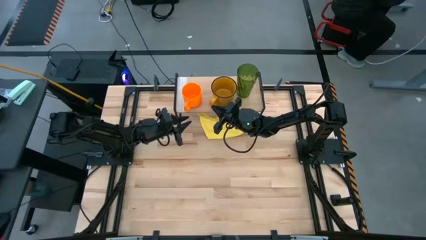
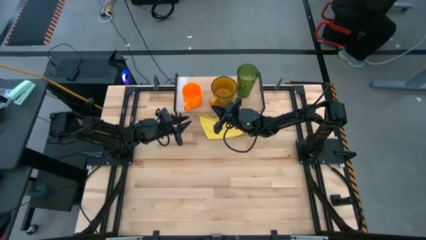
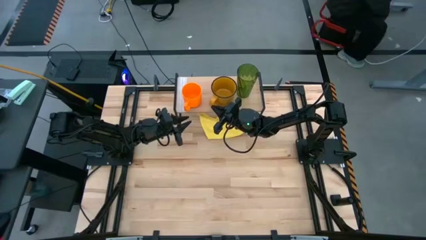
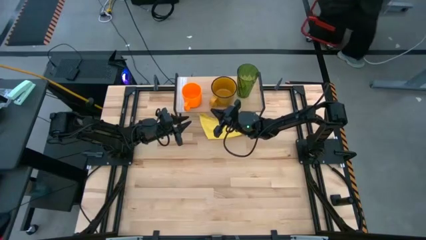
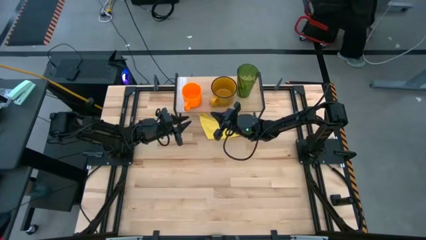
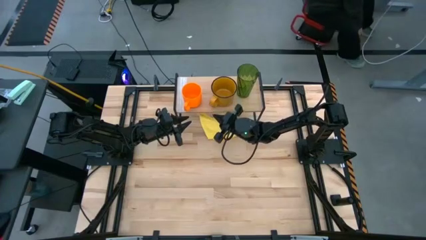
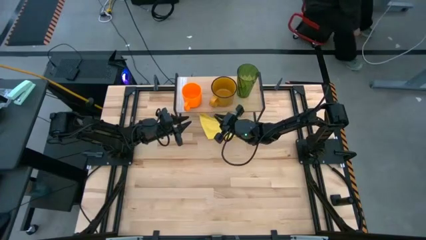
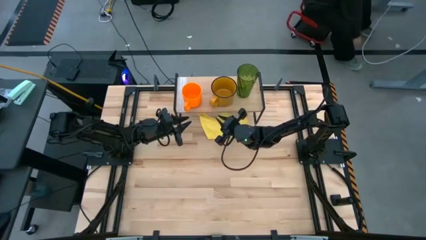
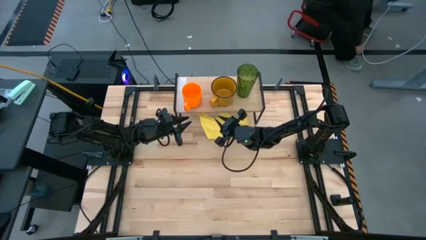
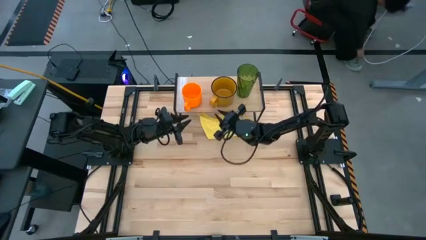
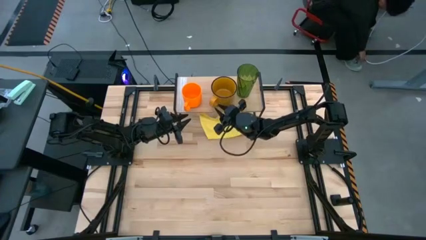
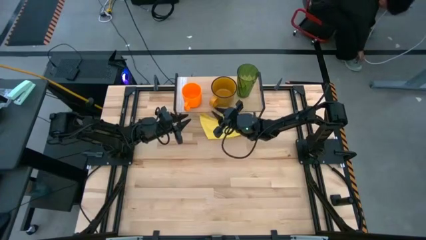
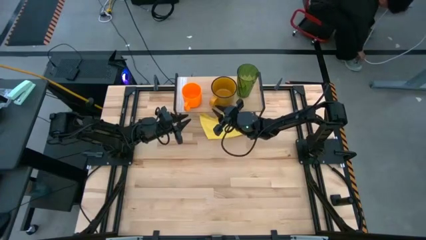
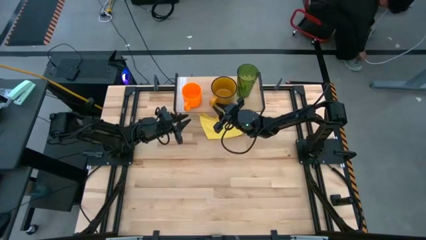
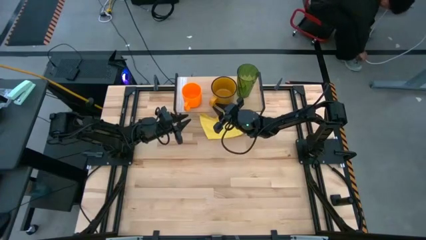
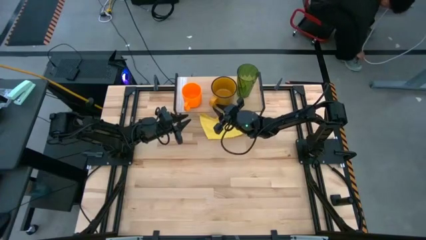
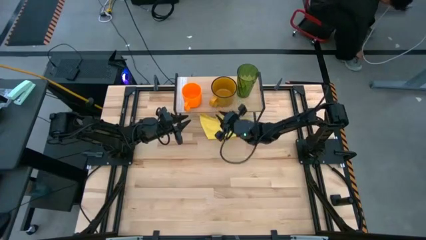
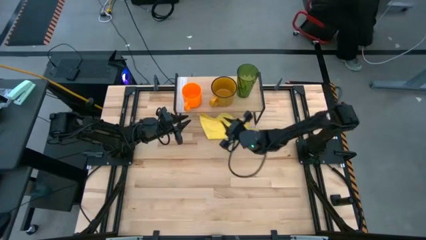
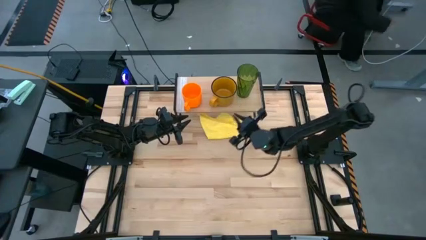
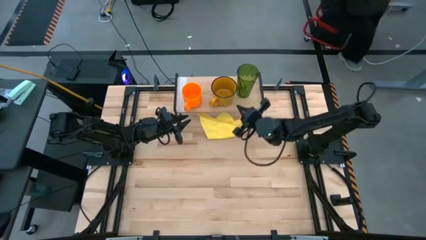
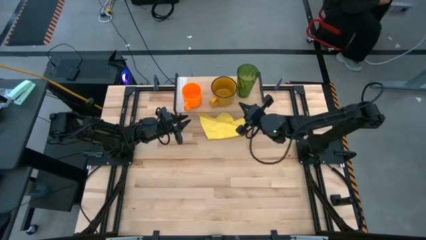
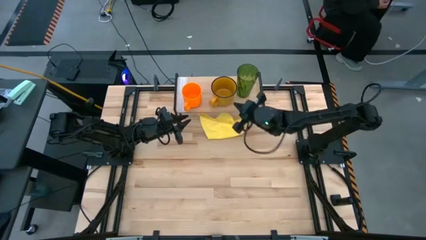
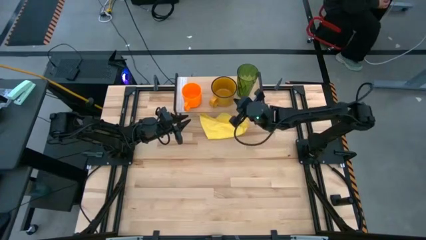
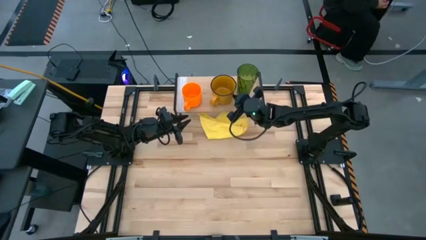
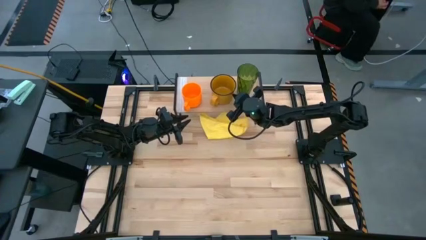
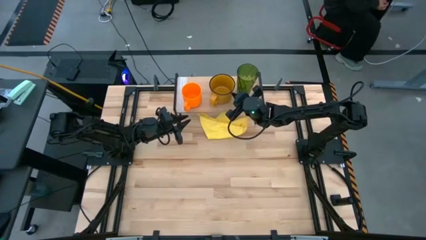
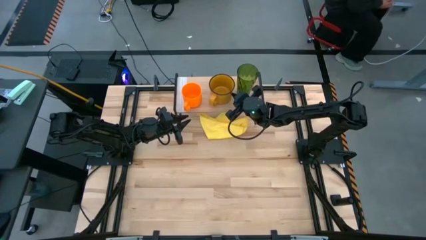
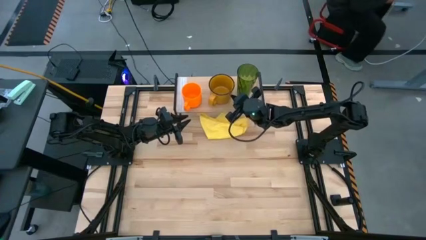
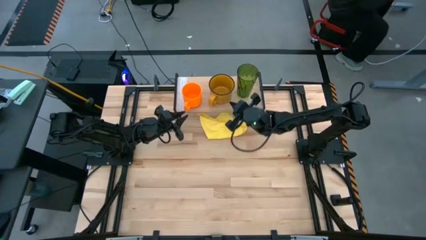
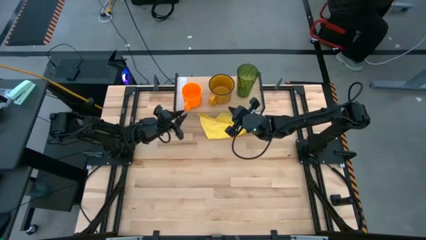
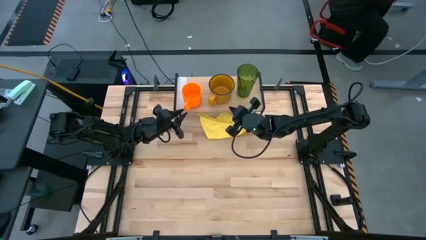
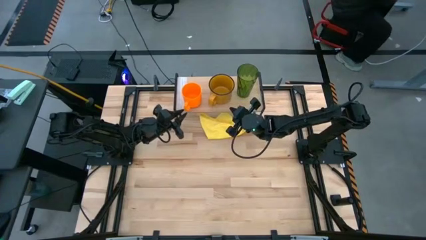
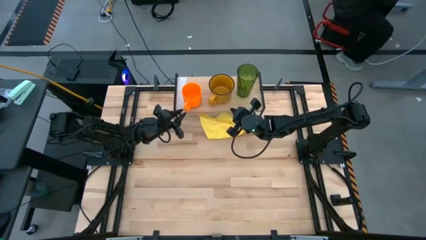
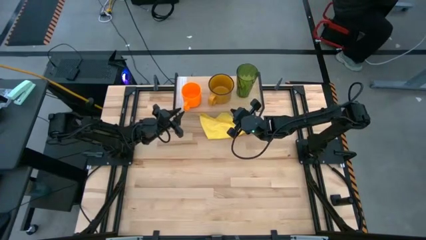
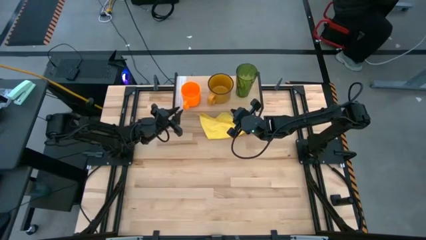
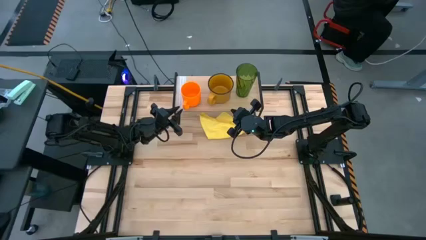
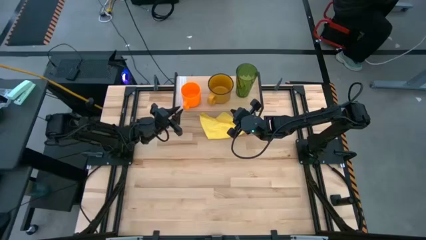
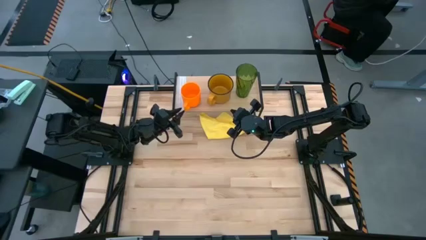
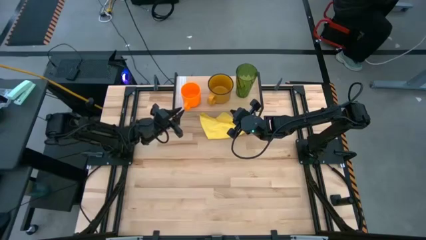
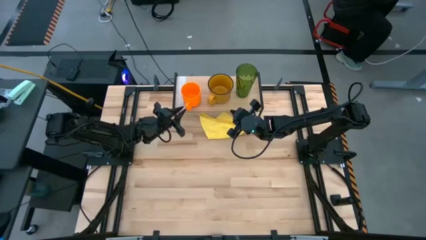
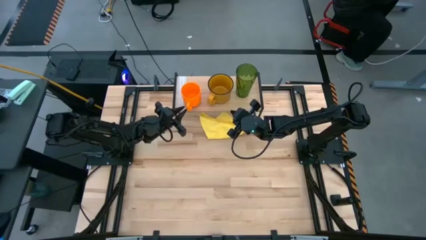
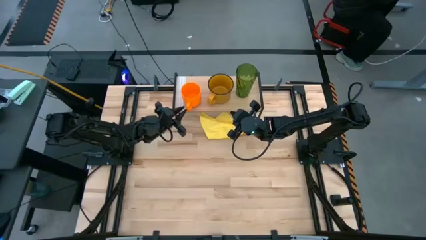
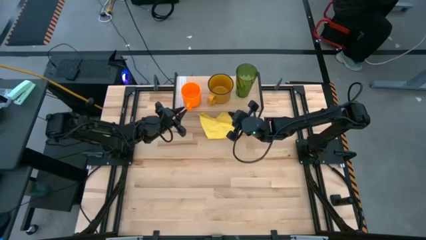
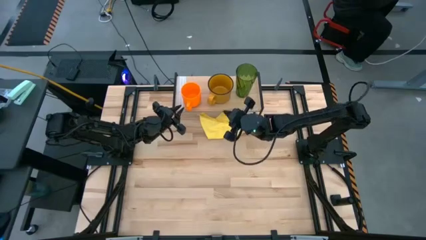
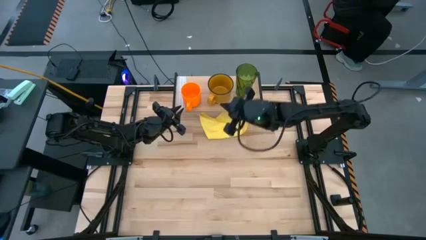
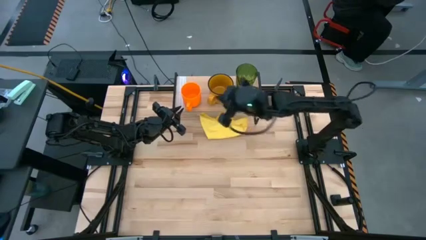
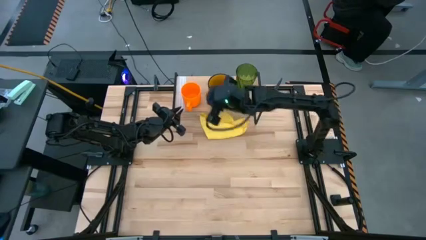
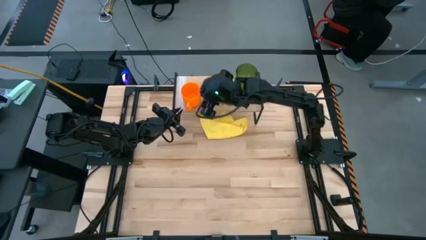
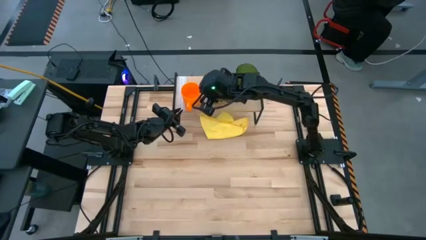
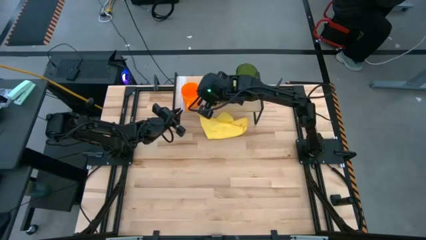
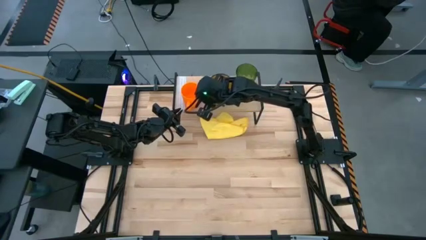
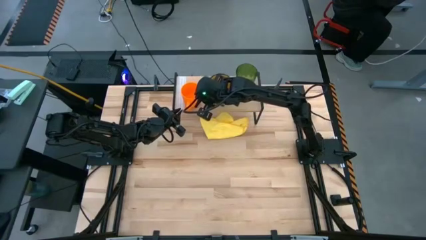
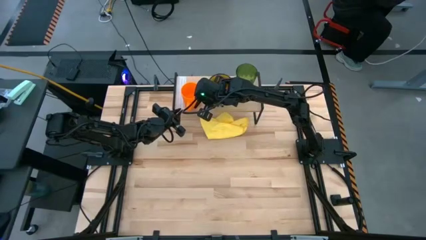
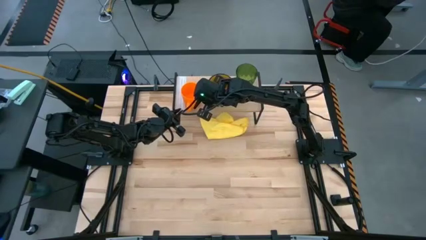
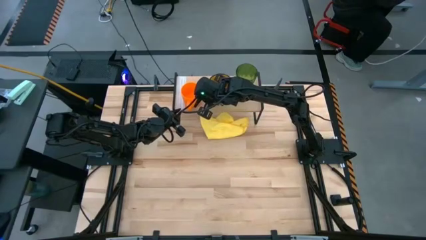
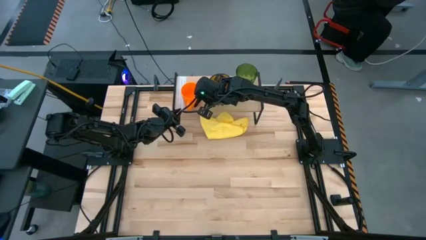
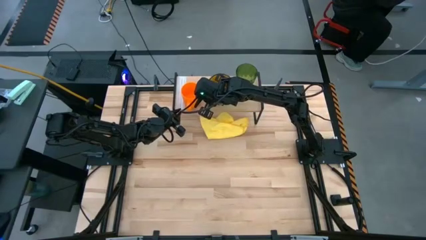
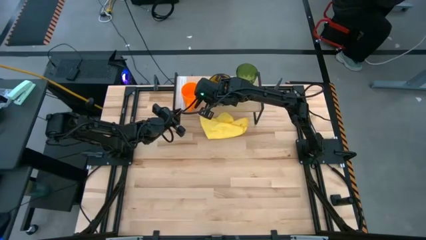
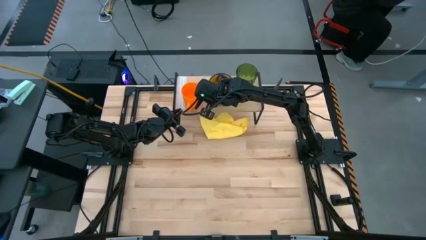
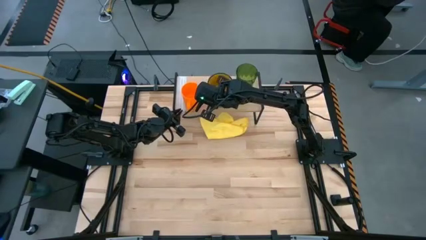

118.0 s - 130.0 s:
Task: Stack small to large cups/mugs on shelf
Adjust the yellow mug
